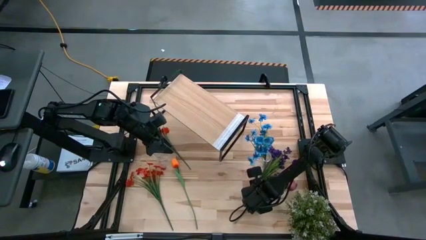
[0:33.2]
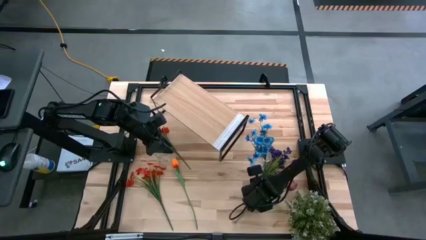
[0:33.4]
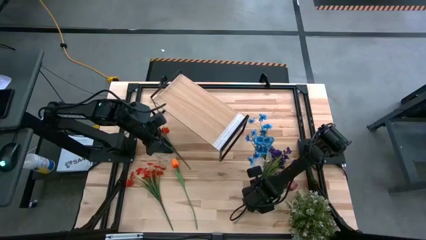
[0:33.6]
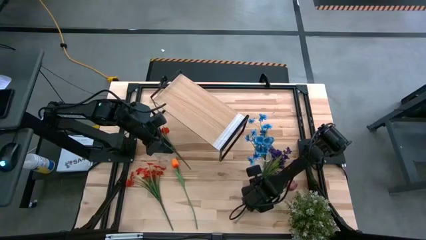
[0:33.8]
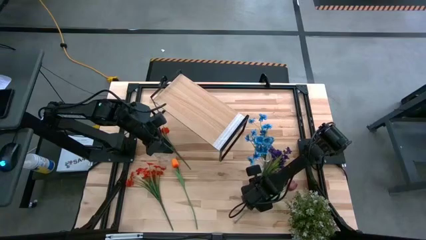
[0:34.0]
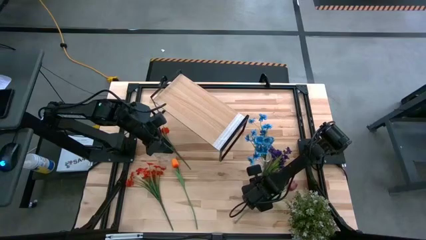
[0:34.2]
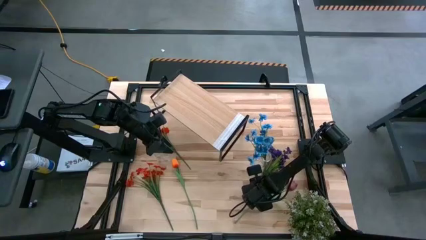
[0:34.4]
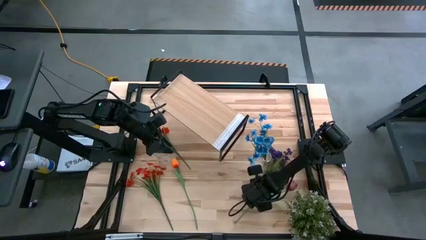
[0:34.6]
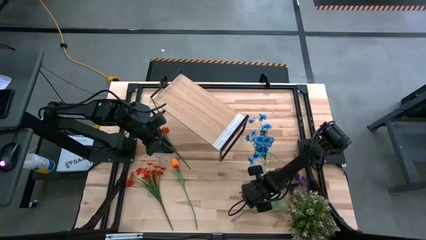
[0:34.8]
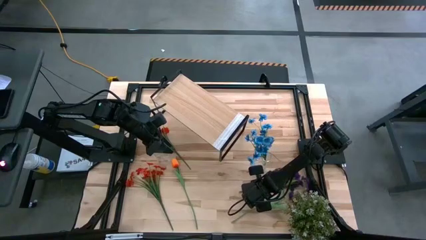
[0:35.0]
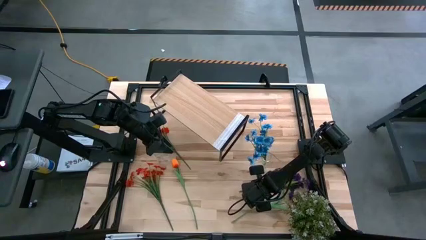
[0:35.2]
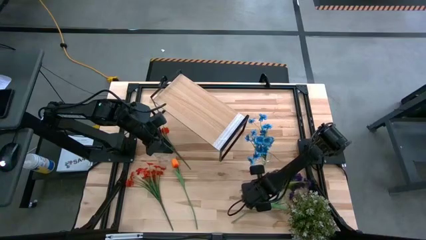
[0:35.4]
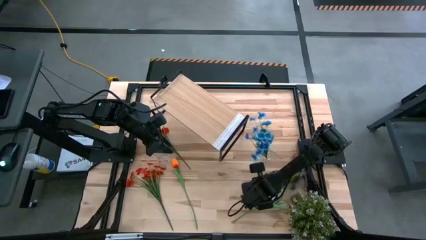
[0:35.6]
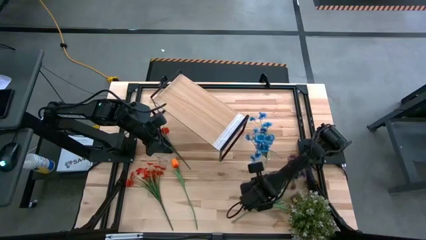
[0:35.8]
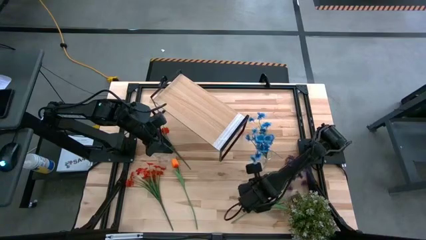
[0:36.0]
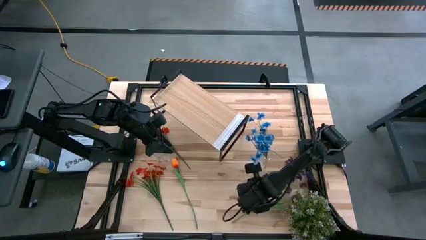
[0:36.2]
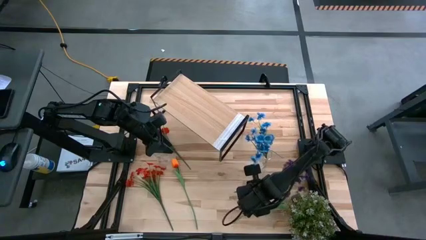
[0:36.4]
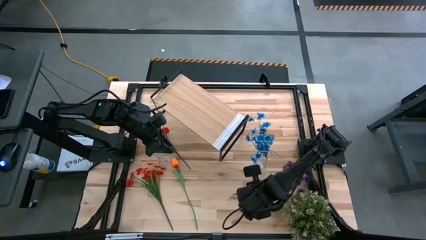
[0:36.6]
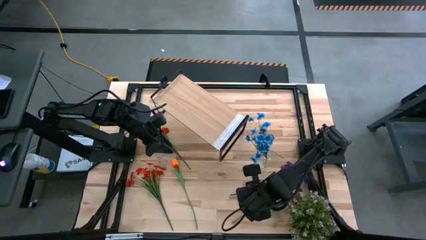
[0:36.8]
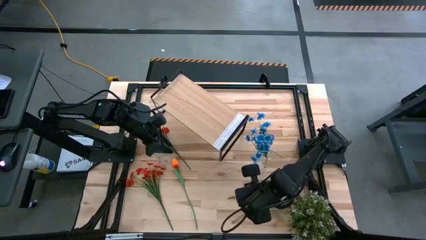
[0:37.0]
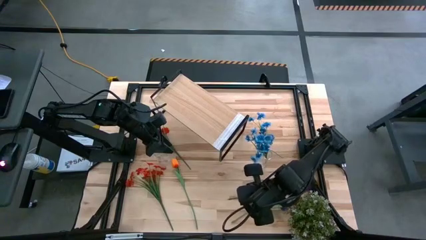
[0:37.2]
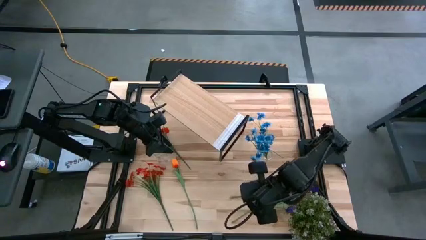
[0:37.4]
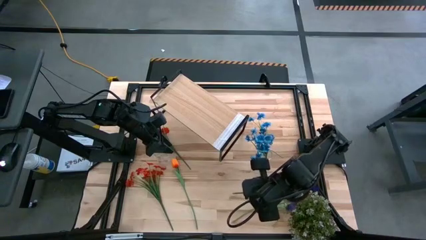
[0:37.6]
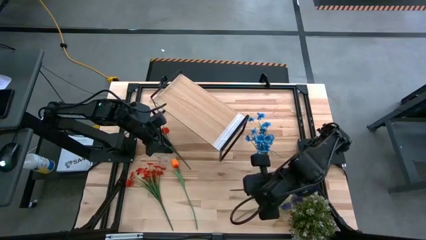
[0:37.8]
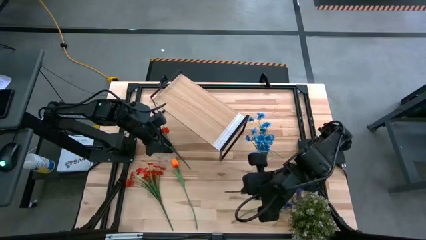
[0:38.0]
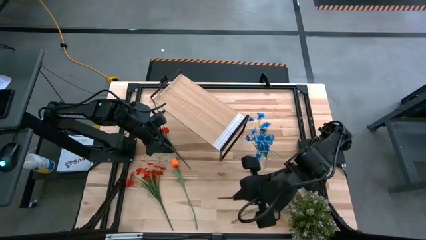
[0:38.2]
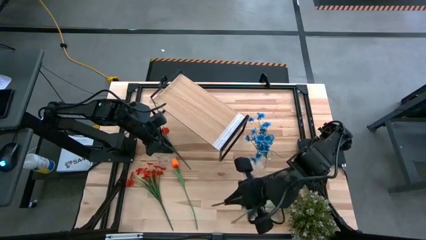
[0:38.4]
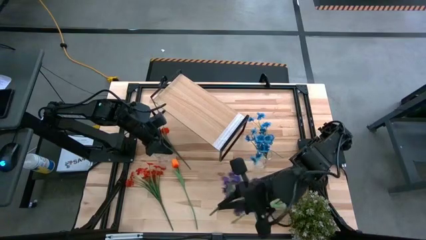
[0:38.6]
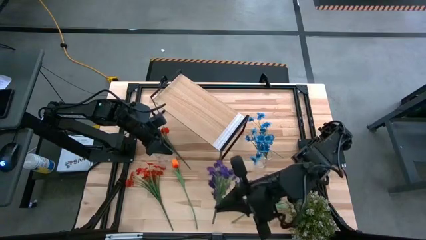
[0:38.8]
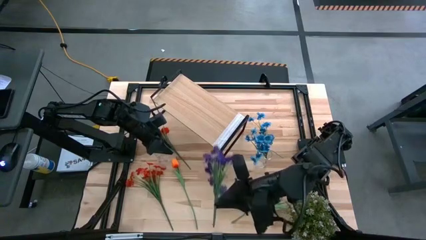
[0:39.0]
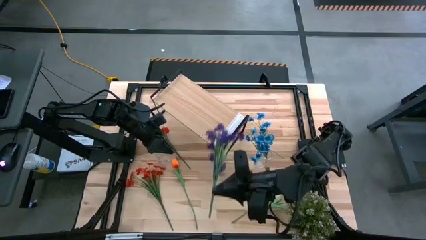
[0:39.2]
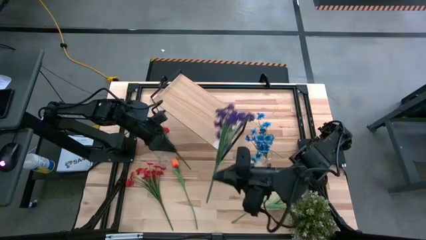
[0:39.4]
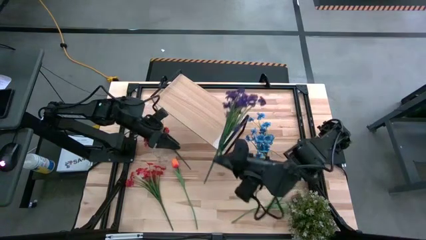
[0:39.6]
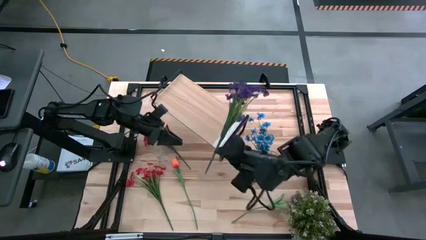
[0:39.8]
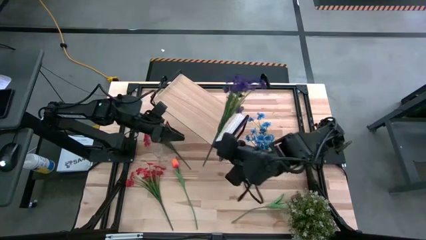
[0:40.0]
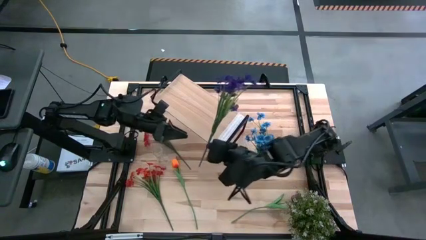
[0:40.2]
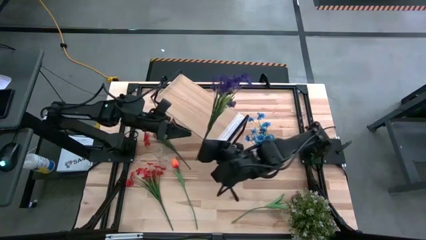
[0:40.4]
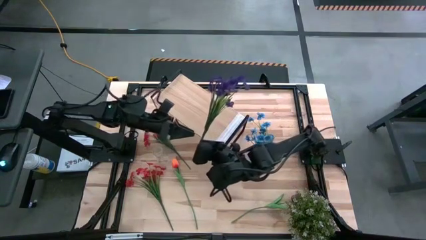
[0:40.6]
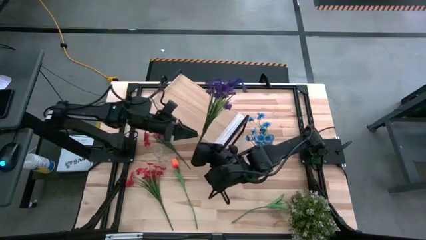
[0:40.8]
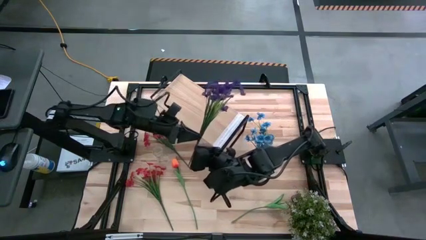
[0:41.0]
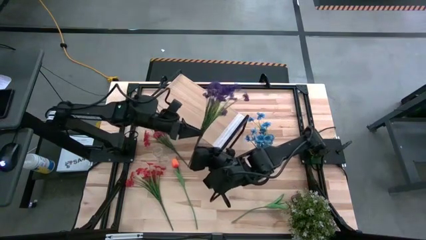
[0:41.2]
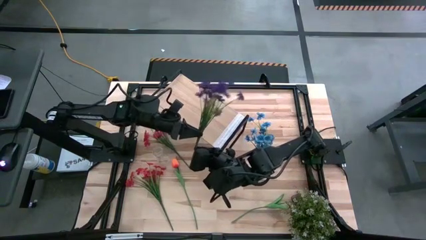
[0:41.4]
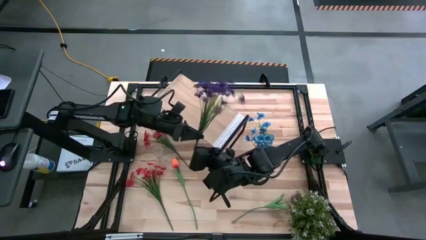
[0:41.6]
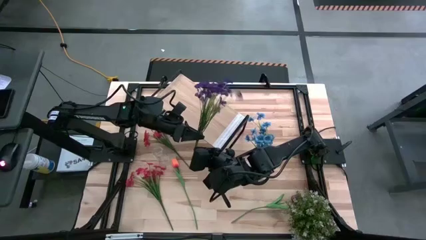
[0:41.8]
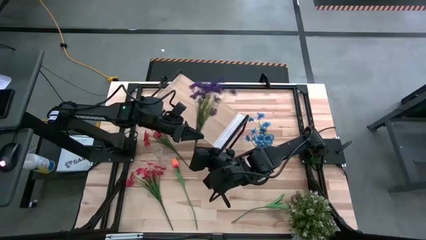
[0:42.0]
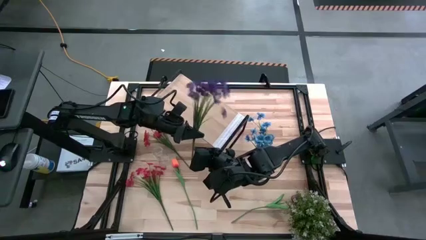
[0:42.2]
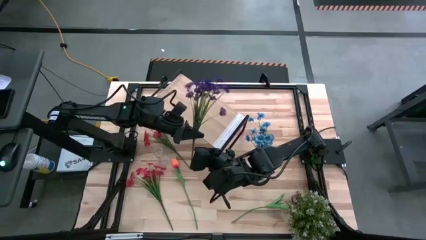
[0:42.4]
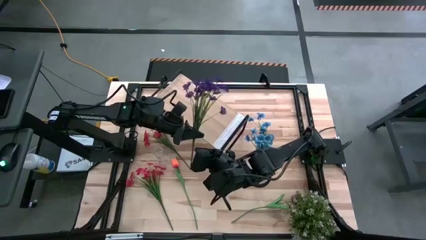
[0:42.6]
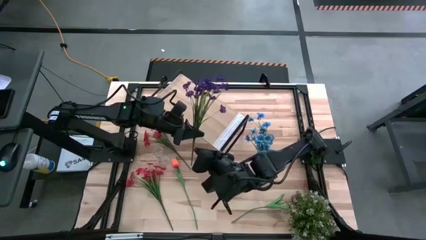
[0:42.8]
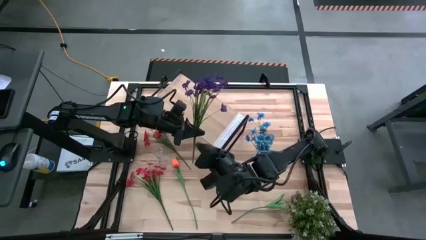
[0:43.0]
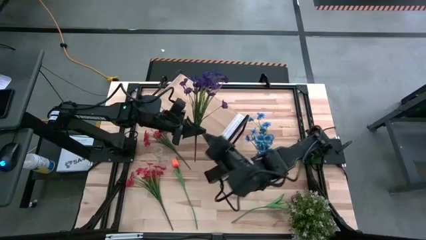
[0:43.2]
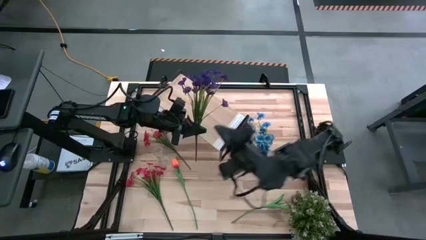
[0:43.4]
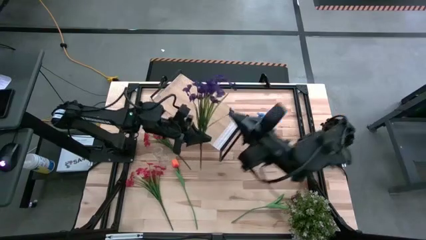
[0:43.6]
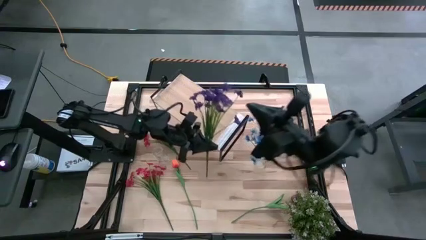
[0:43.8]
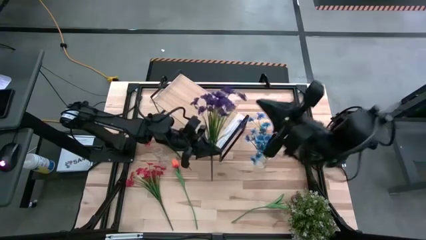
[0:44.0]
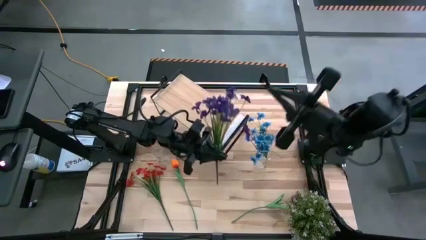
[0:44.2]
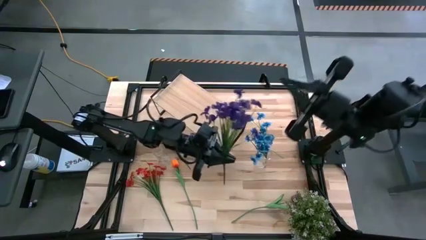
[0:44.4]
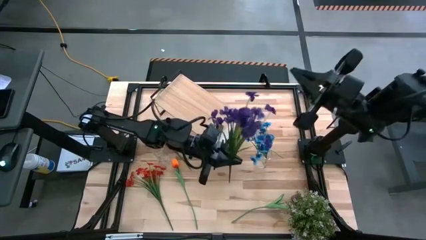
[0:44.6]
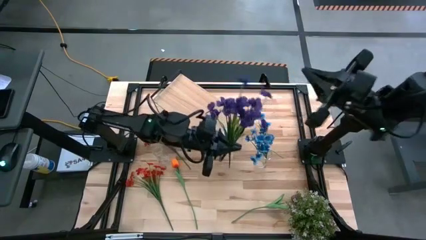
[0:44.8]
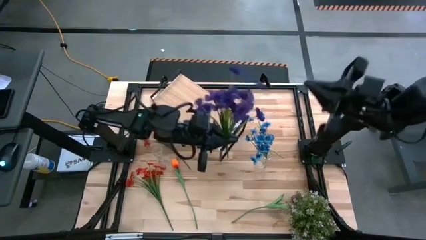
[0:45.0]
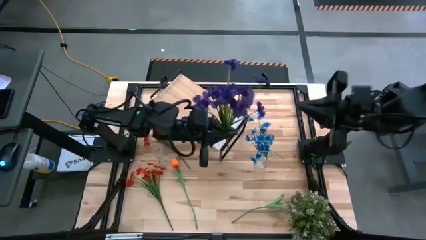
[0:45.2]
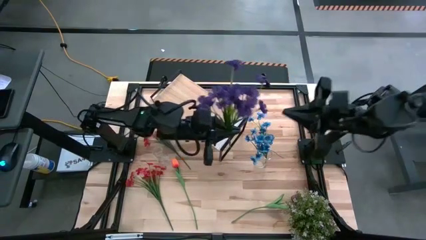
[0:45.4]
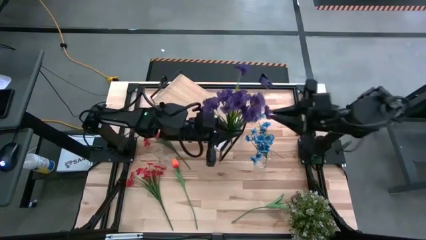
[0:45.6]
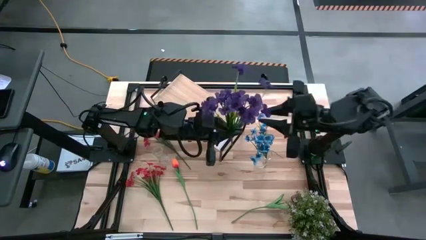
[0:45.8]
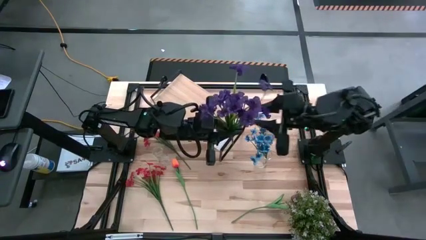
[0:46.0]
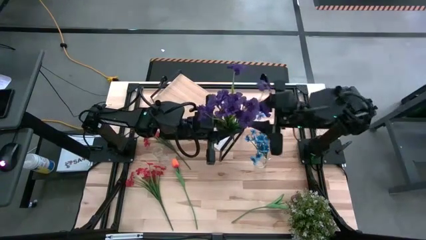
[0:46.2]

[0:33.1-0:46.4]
Task: Pick and place flowers into a vace then onto a shelf
Put the purple flower into the right transparent vase

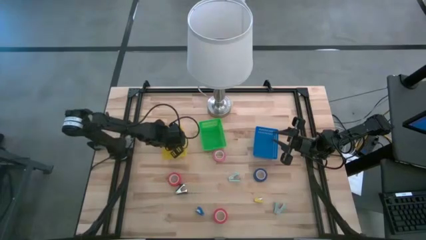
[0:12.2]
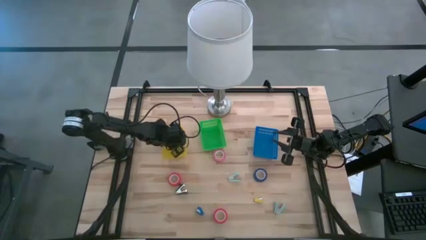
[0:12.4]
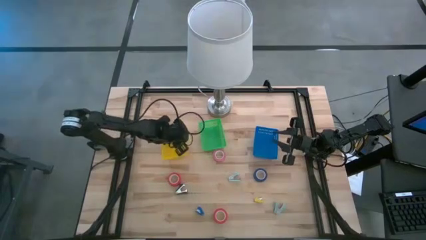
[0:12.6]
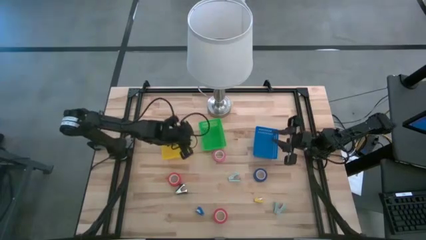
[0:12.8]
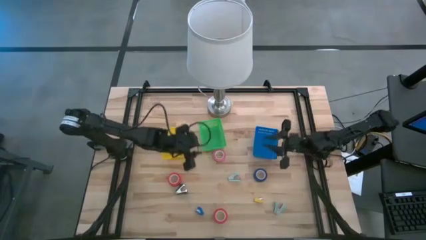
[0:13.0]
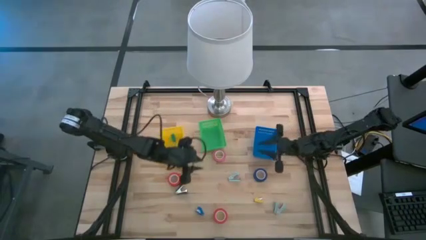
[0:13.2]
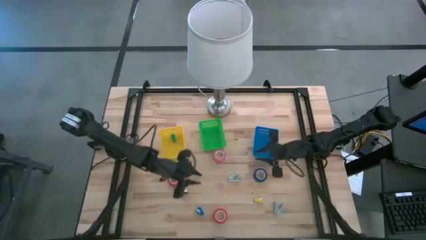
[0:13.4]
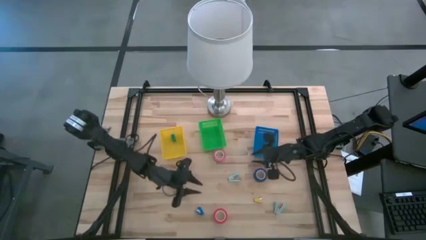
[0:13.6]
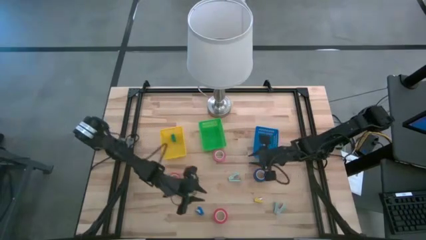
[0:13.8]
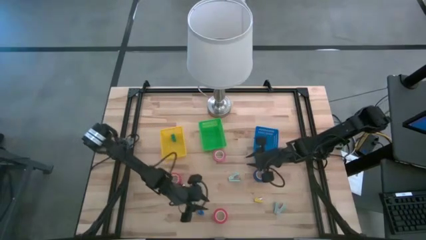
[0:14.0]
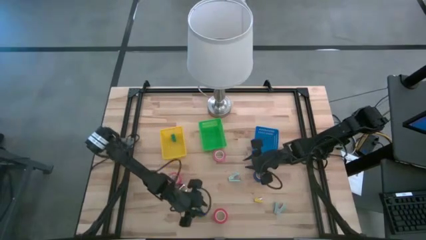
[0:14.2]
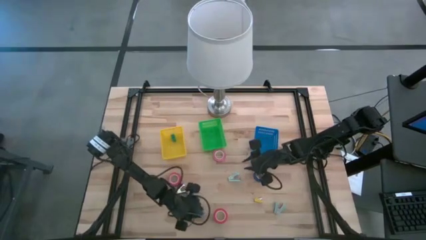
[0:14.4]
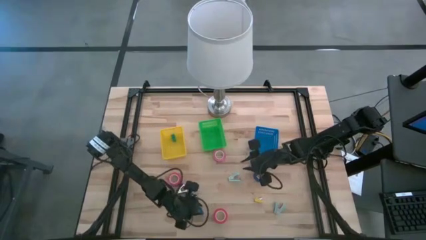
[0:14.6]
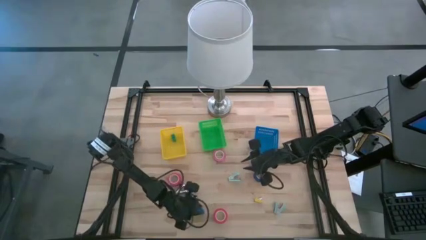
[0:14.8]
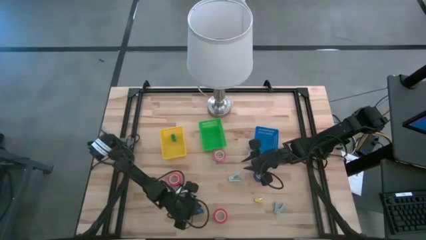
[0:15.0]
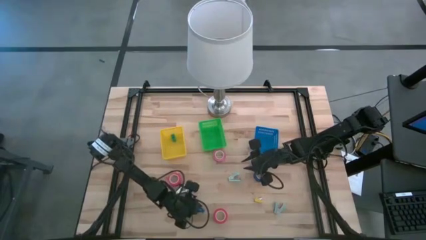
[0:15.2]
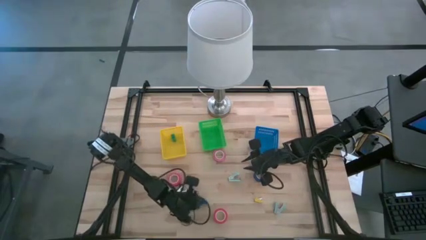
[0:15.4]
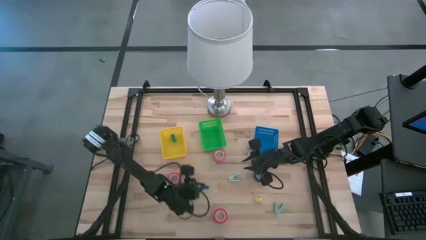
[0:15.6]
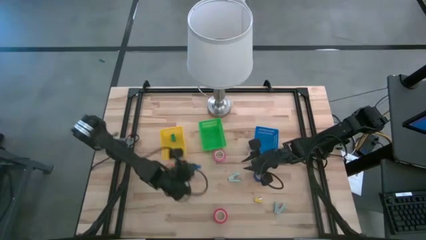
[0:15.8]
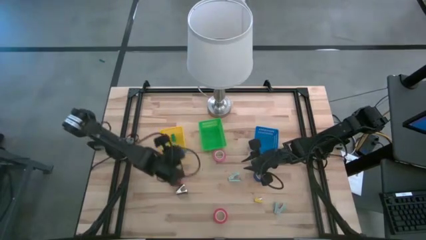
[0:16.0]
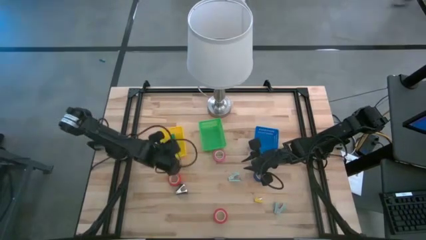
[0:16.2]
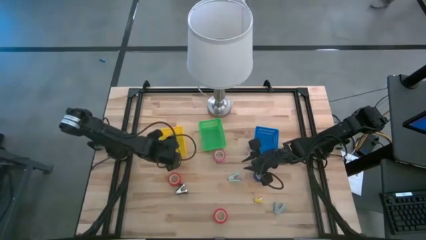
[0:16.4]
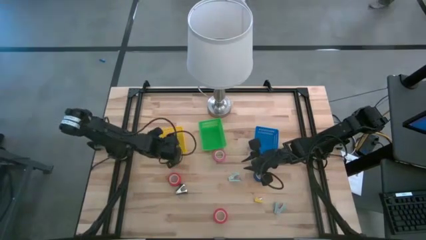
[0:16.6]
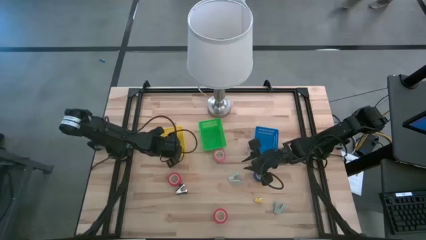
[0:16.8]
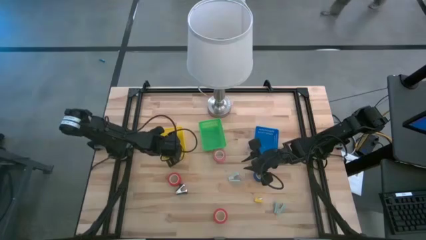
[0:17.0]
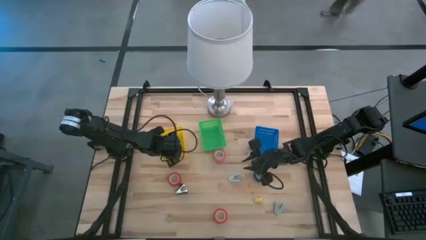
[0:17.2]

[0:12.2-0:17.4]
Task: Pick and place Stapler, Stapler remover, tape
Put the blue stapler into the yellow bin
